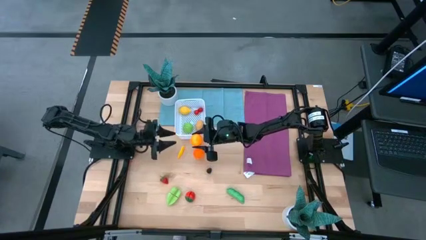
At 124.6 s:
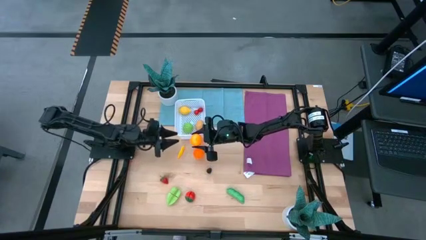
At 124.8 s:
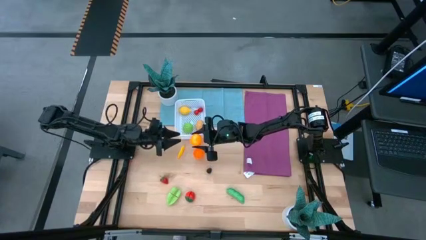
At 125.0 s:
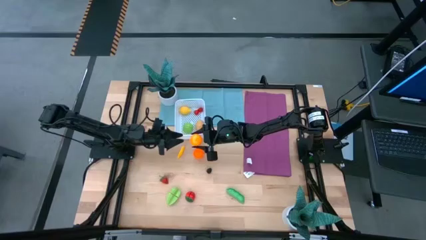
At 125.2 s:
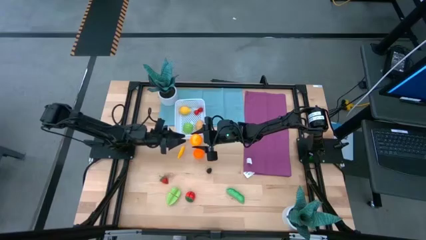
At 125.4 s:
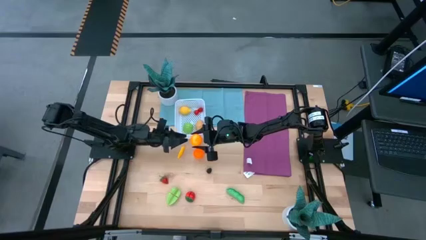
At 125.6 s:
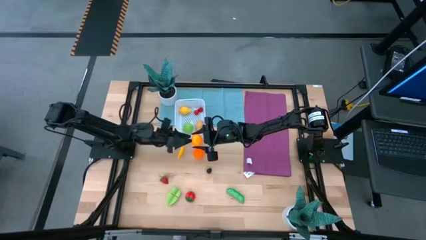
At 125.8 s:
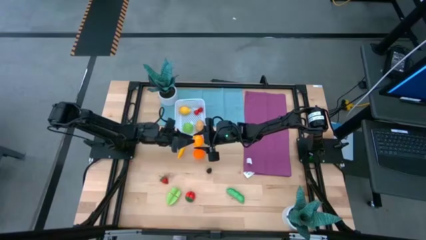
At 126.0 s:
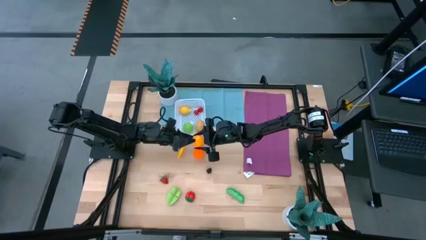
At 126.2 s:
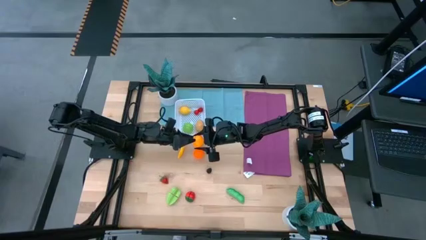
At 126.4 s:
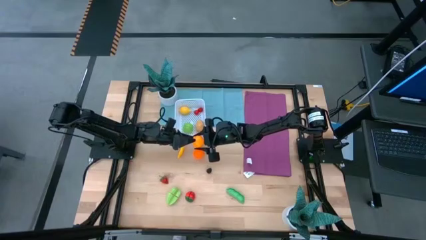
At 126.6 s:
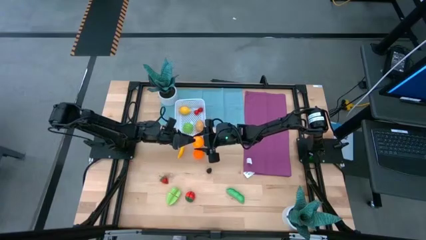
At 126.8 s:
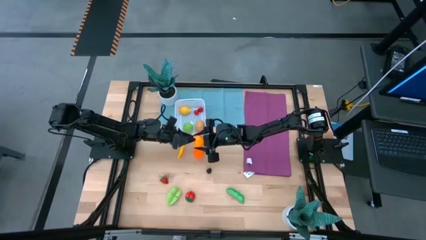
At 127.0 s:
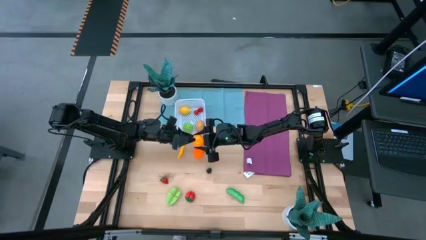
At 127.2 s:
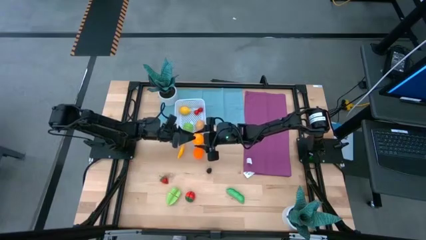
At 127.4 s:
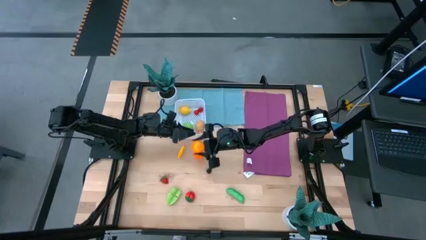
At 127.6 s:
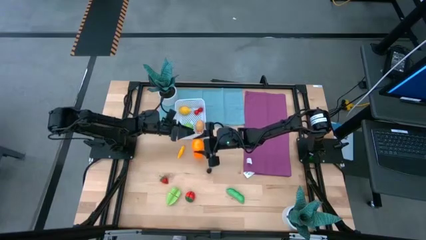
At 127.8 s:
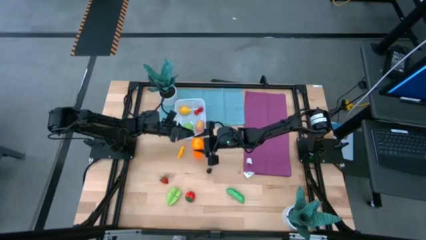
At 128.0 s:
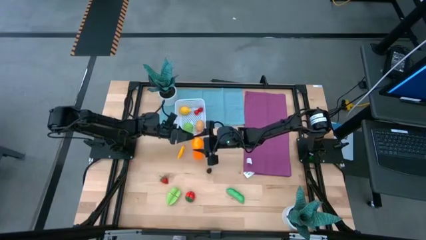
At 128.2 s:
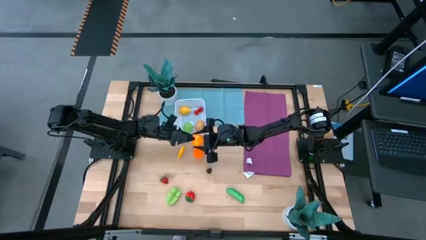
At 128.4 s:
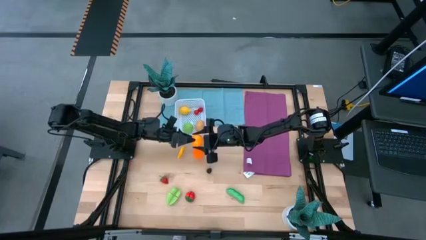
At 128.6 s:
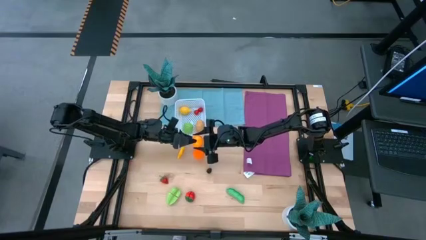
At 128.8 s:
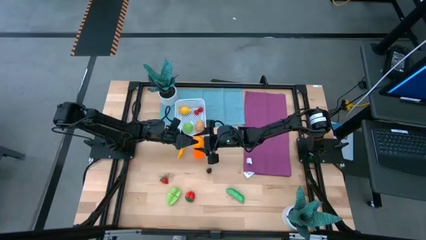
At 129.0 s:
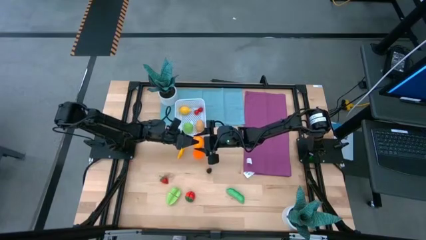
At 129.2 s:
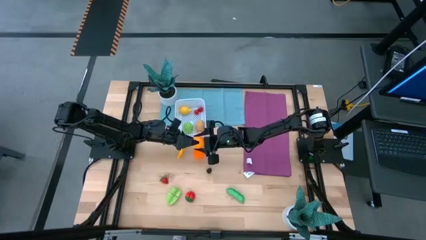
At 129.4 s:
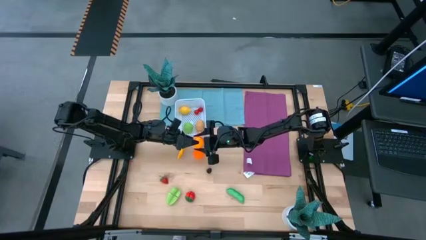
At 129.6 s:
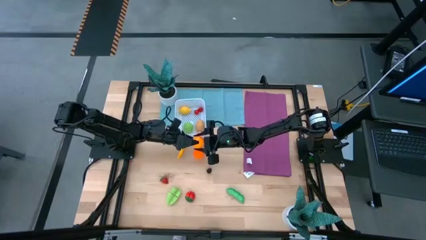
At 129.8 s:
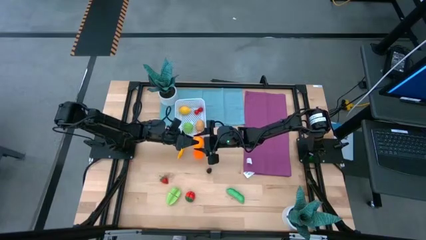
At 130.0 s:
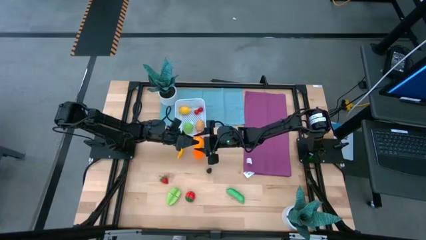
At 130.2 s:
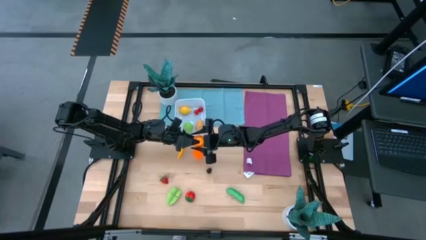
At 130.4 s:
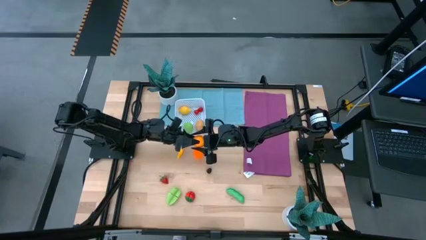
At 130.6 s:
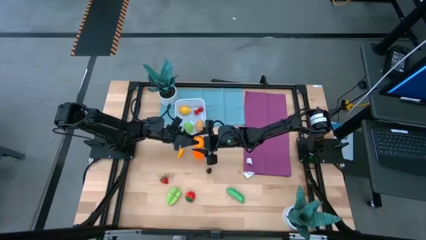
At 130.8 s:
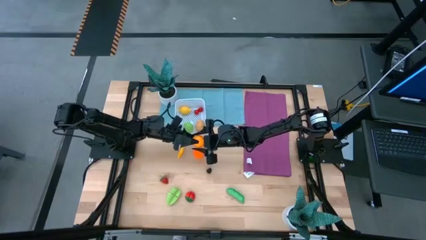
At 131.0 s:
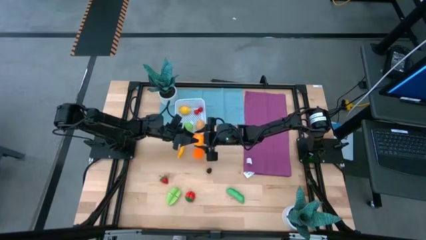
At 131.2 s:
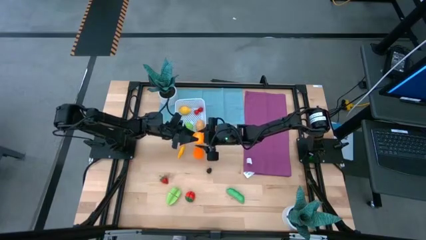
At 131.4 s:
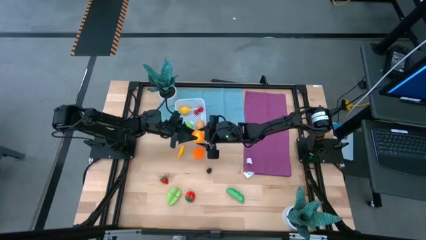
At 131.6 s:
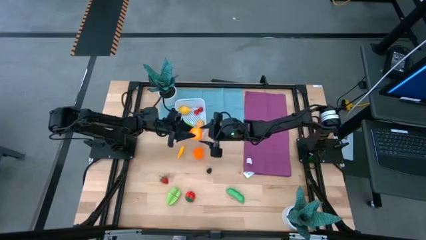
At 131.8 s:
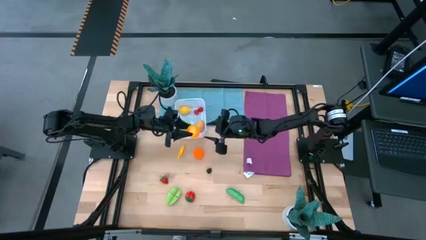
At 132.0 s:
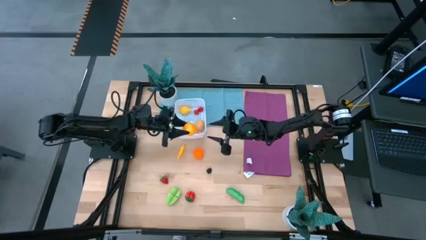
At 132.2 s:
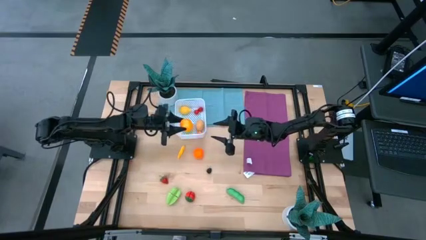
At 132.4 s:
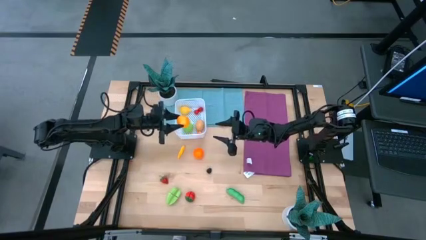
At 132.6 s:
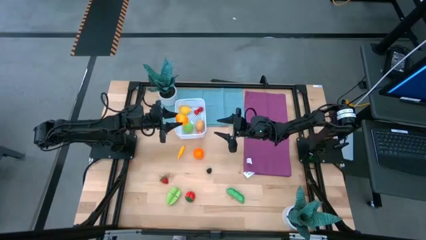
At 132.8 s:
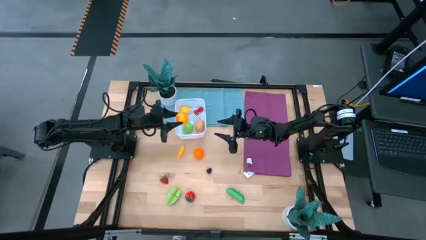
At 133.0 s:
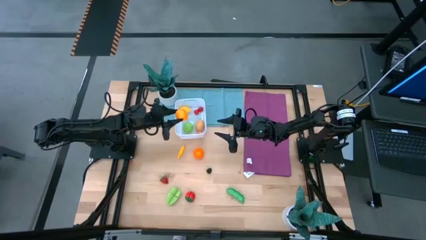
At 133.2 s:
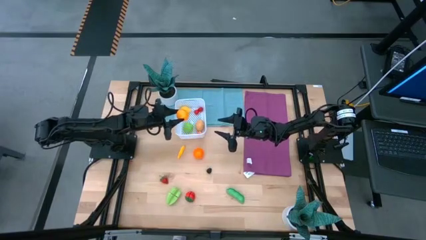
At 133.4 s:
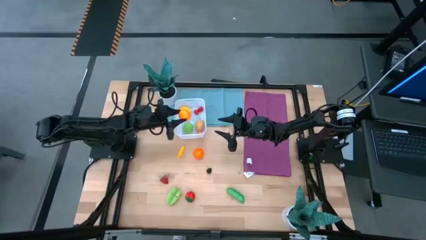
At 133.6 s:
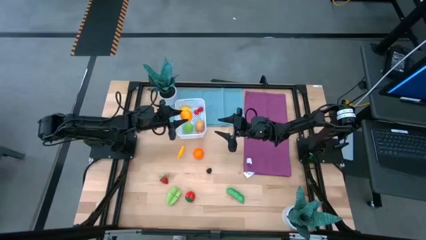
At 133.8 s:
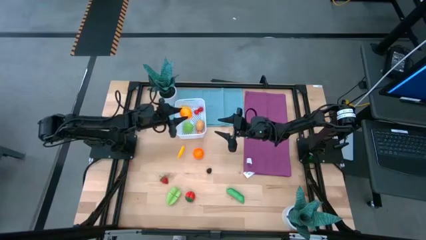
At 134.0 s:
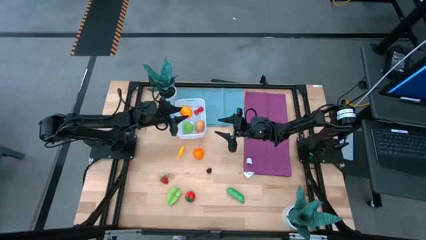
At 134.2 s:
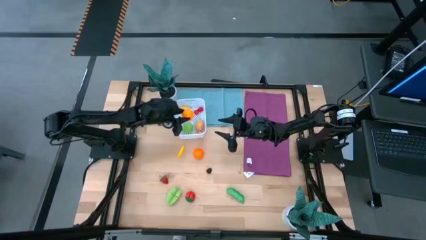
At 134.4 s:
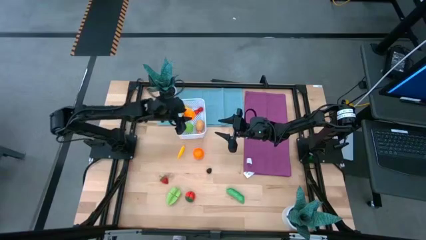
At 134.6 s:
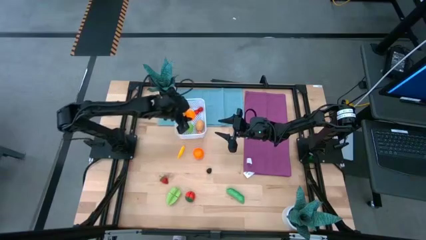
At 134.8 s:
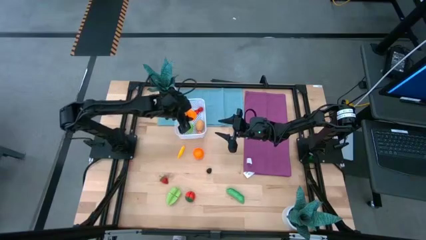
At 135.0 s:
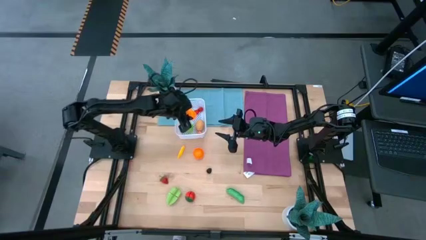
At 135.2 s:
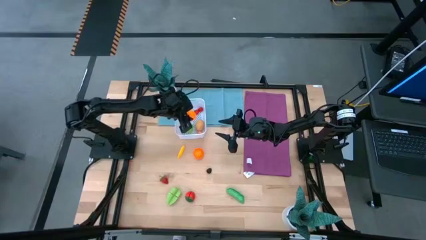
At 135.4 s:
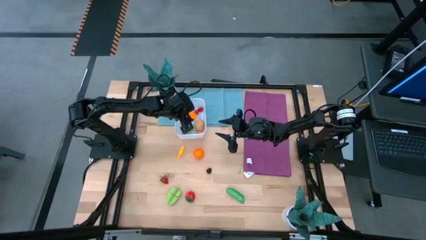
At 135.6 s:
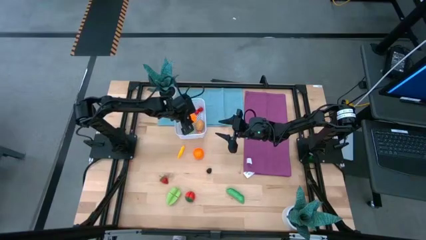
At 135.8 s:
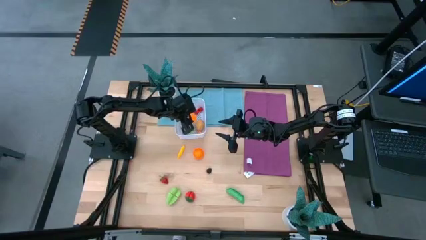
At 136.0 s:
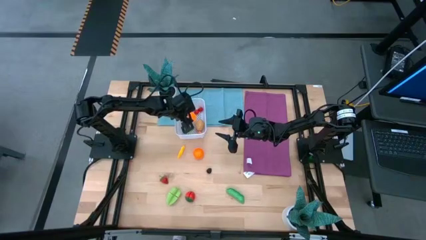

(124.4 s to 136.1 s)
Task: Pick and placing Produce into tupperware
Put the orange into the white basket

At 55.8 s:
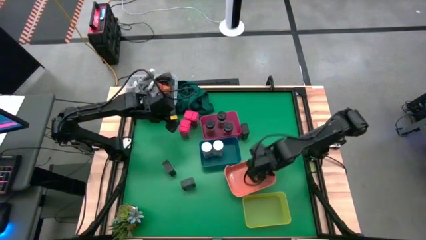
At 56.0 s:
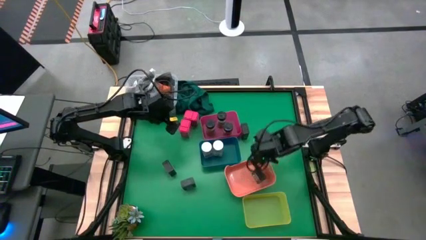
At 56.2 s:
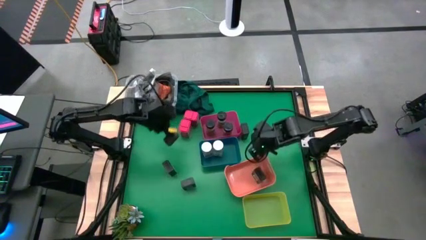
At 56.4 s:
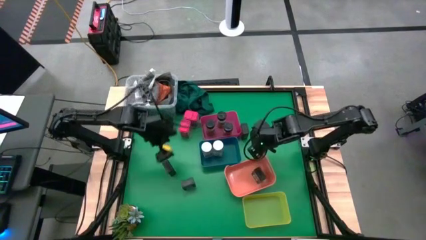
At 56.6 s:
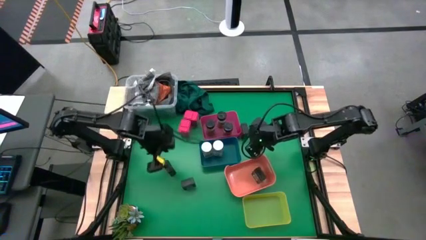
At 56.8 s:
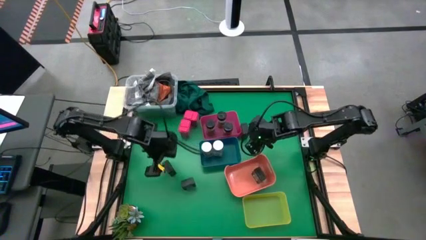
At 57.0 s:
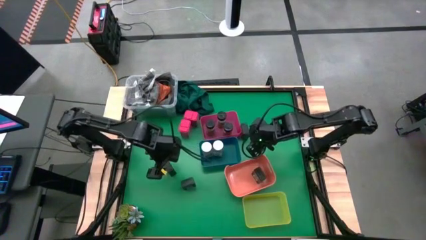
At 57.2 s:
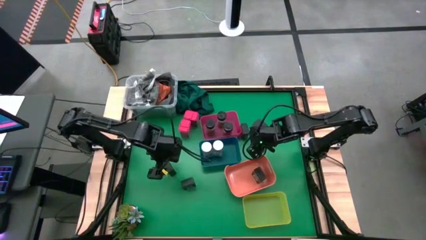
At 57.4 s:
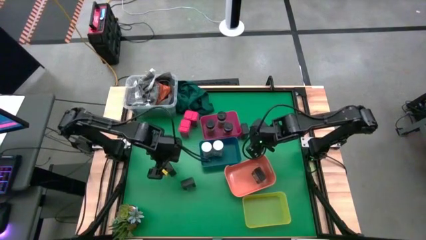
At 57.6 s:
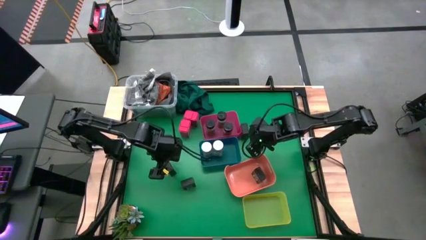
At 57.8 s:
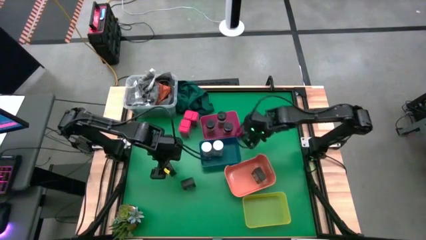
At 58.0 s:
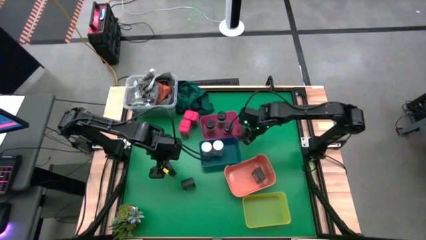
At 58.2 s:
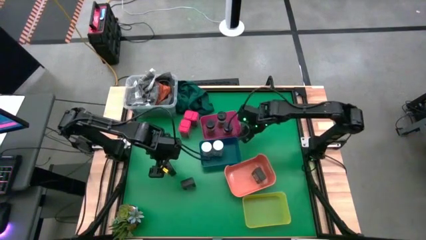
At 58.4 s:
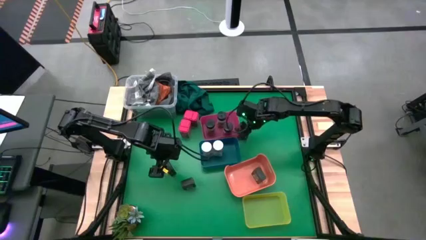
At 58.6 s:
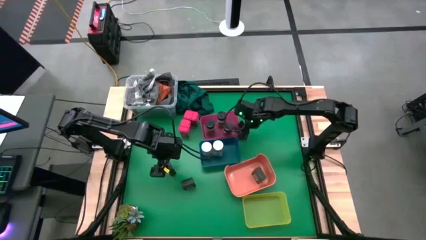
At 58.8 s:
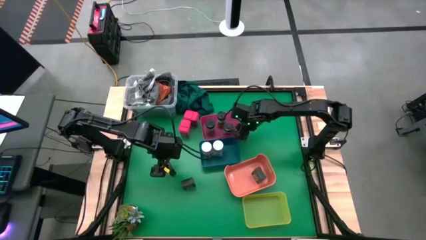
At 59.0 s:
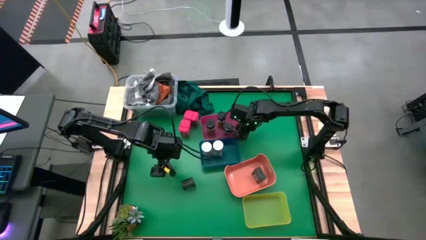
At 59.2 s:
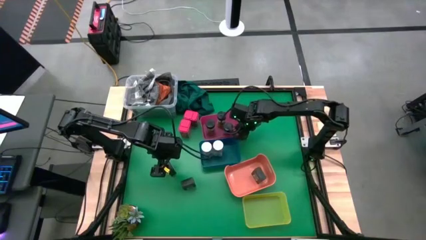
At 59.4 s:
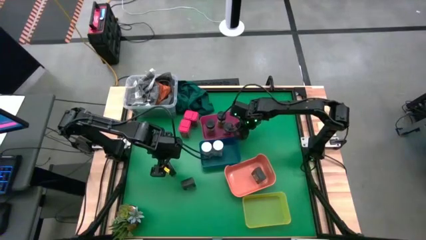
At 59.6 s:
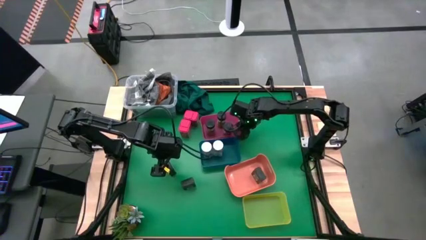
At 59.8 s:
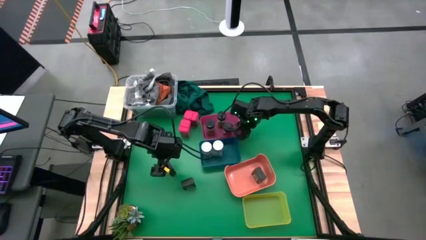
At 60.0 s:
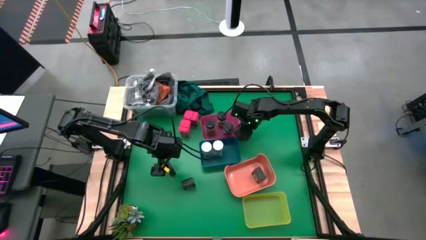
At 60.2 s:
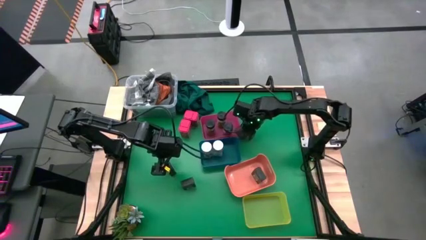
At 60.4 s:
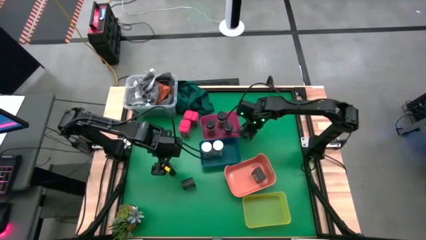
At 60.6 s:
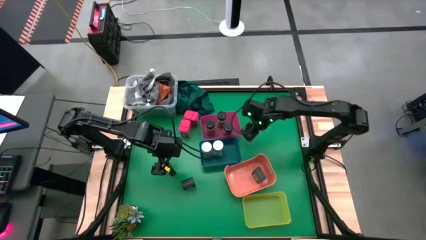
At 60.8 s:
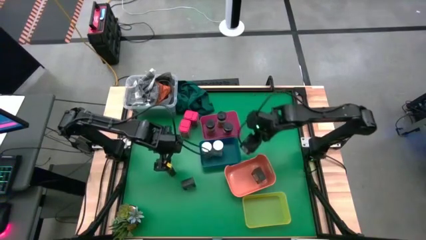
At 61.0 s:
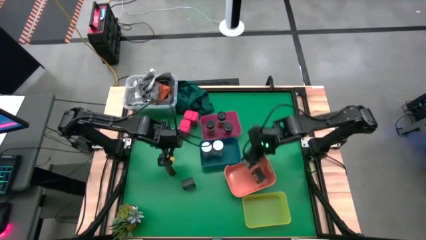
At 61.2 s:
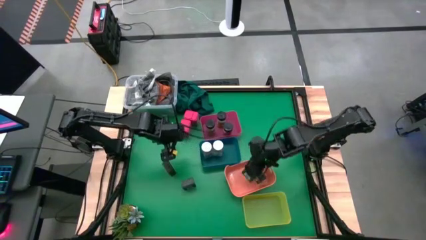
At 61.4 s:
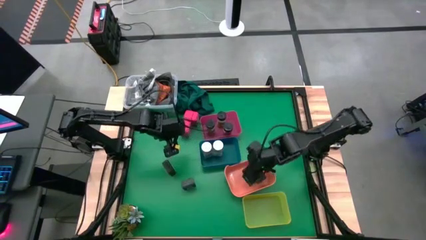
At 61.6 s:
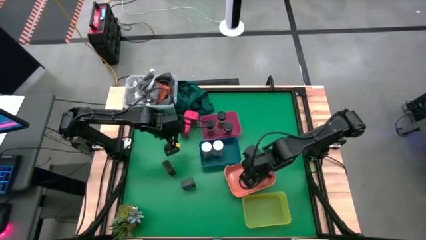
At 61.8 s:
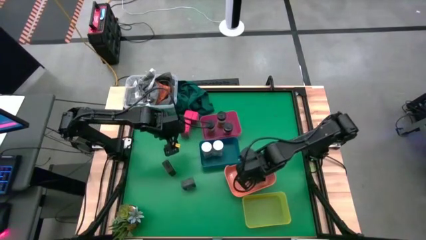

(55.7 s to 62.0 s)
Task: Sort spices by type
Put the top right black seasoning can into the orange bin
